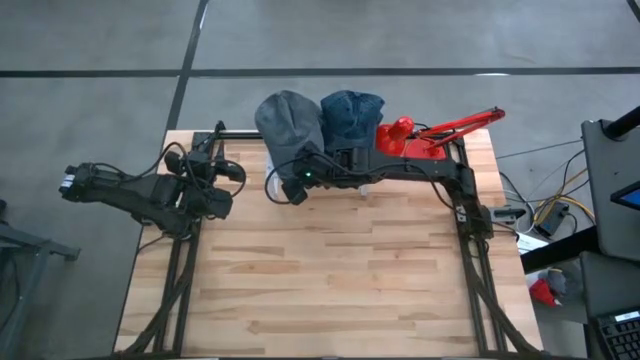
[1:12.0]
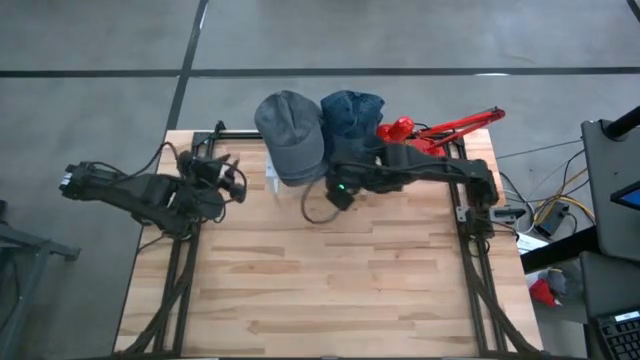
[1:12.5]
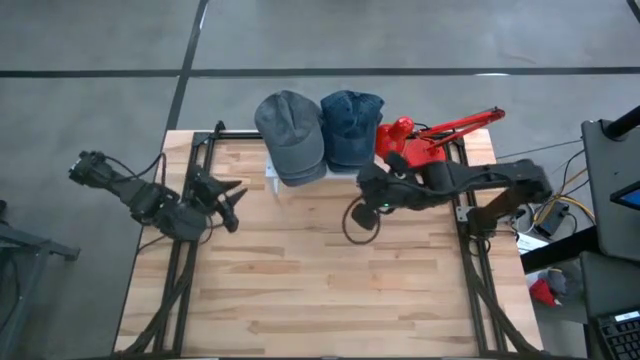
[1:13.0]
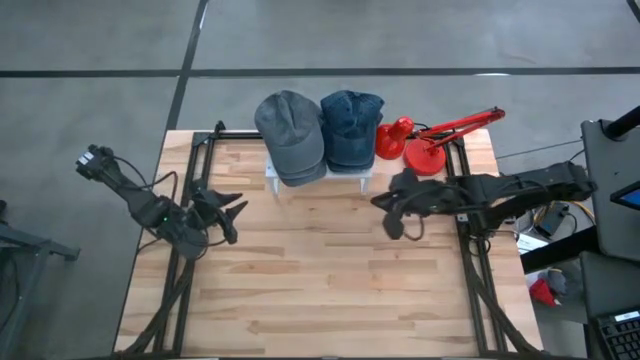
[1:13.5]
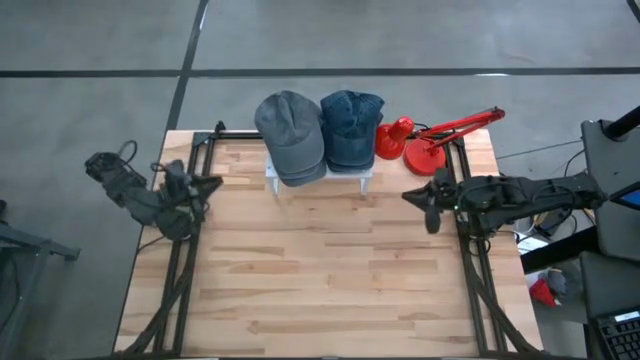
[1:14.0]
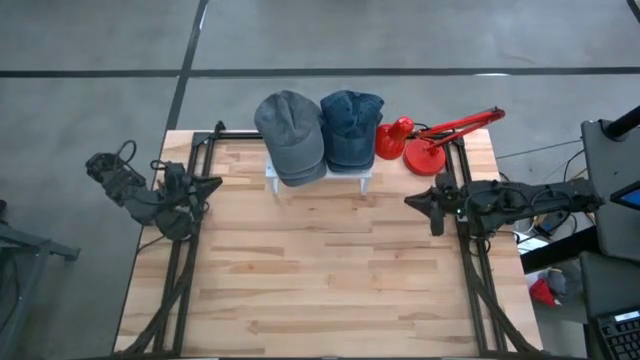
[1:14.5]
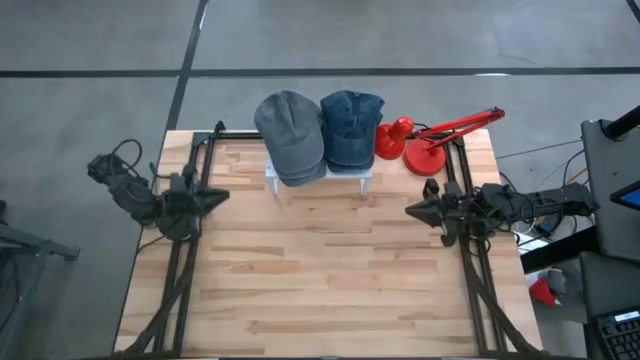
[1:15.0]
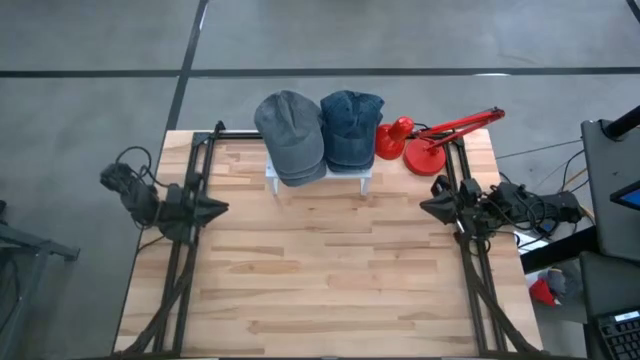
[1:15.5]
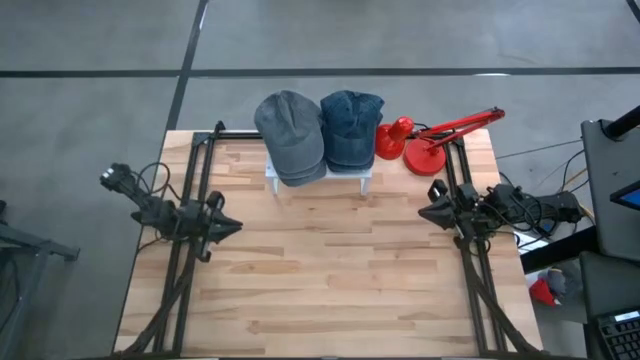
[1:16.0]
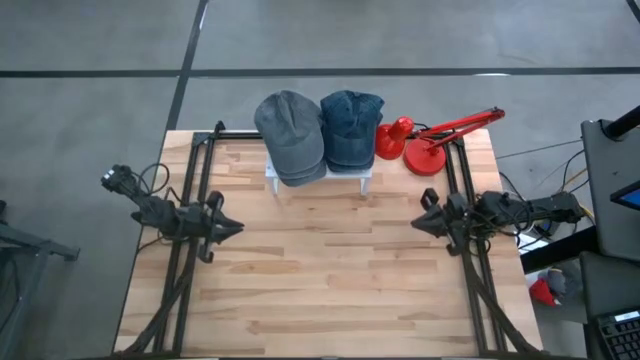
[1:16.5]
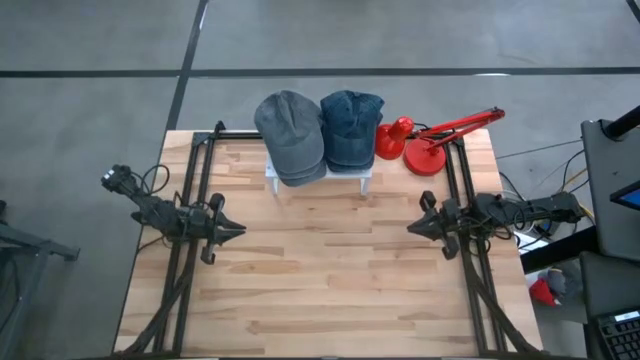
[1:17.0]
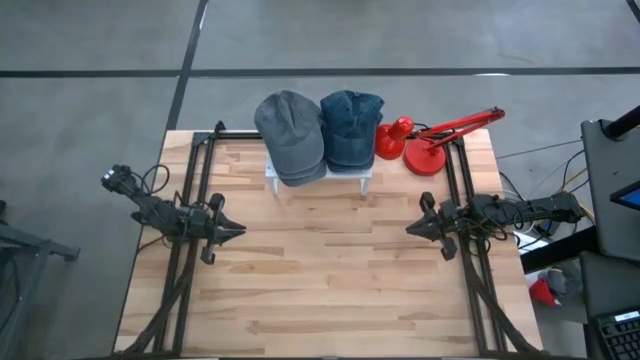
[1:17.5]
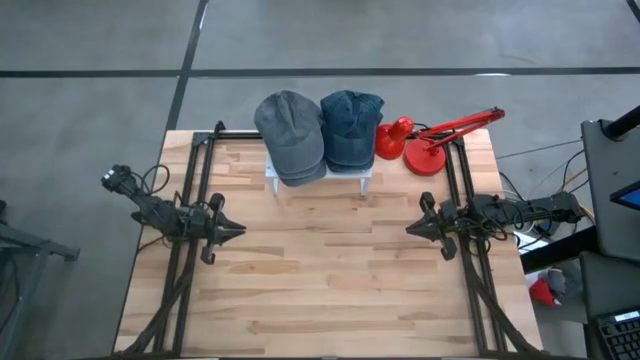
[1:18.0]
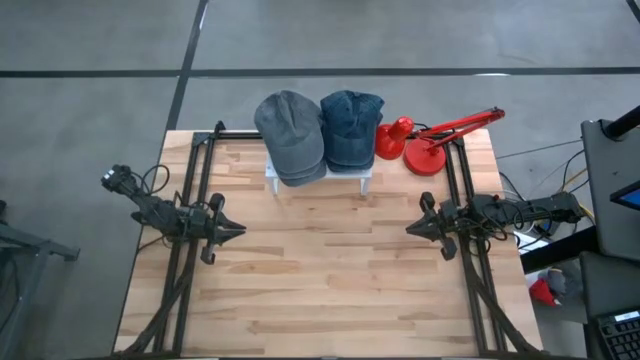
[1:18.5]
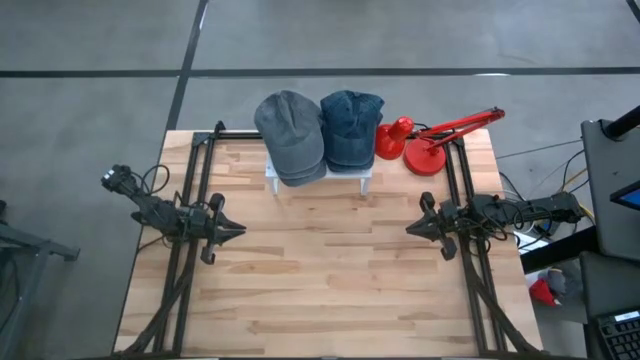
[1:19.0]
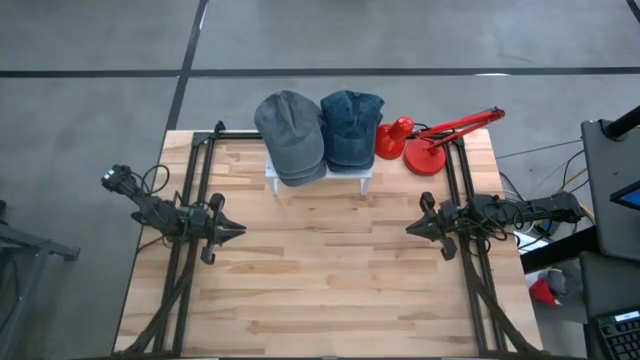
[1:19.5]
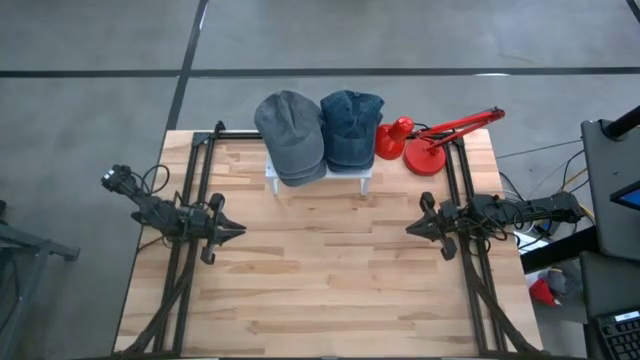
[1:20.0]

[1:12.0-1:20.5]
Task: Pick & Place hat
Return to Home Position

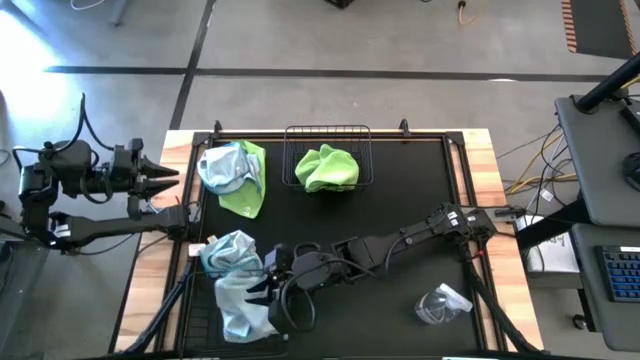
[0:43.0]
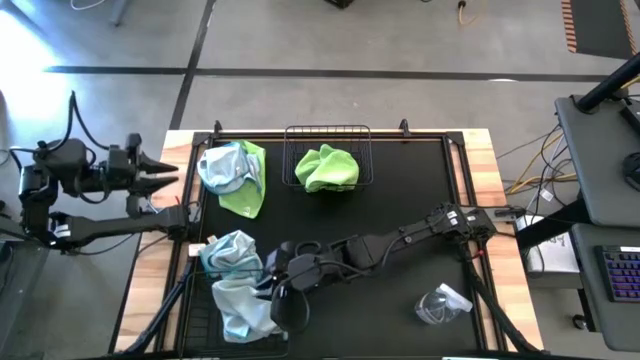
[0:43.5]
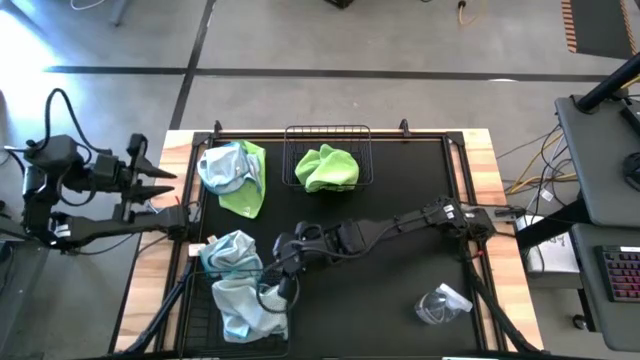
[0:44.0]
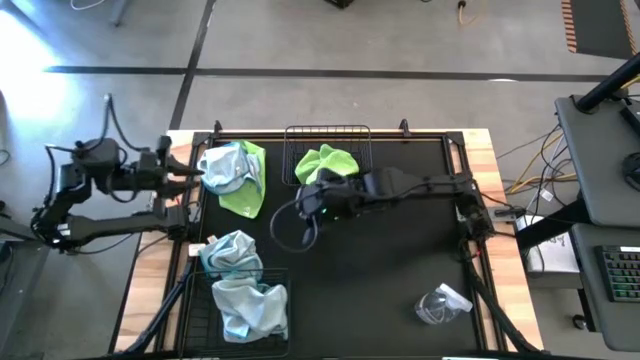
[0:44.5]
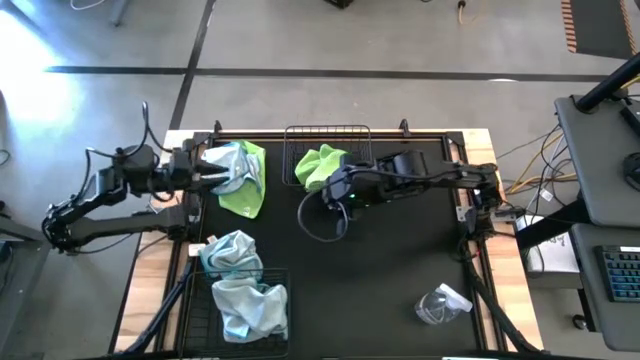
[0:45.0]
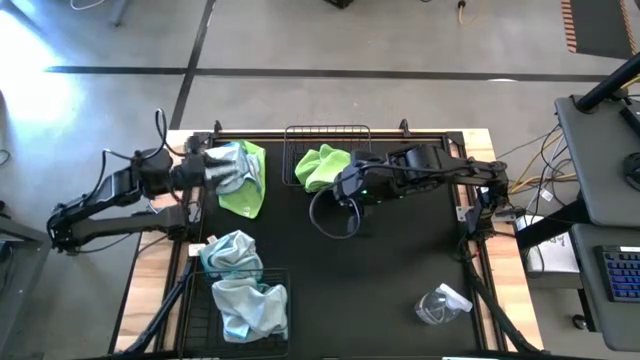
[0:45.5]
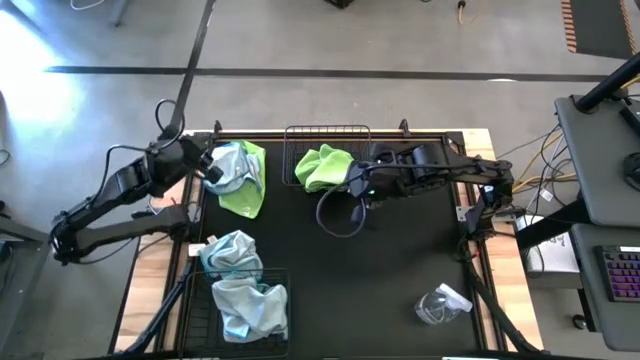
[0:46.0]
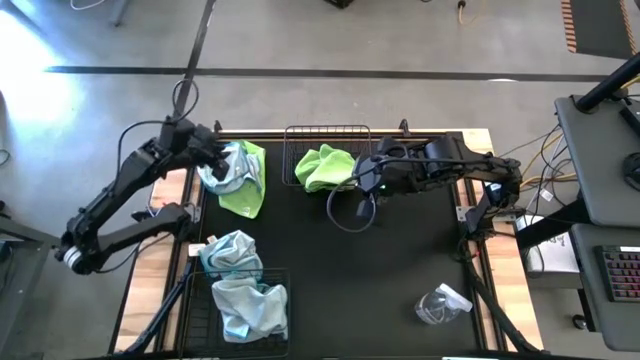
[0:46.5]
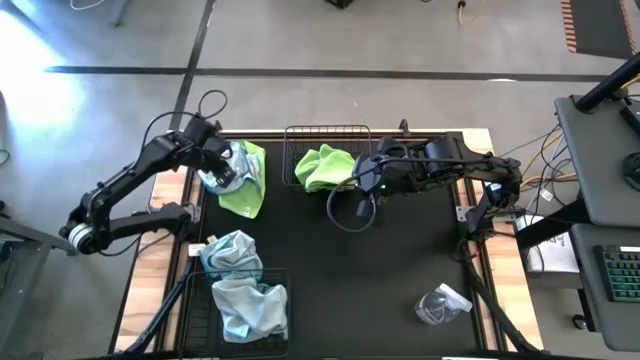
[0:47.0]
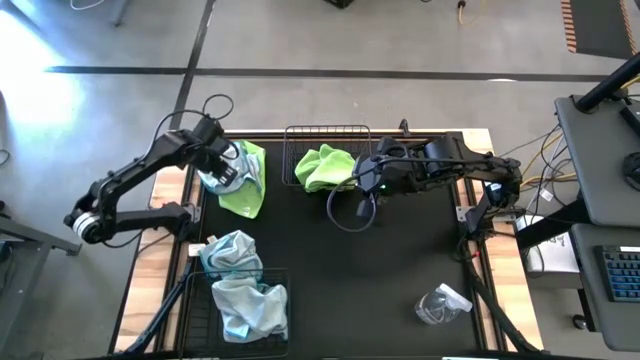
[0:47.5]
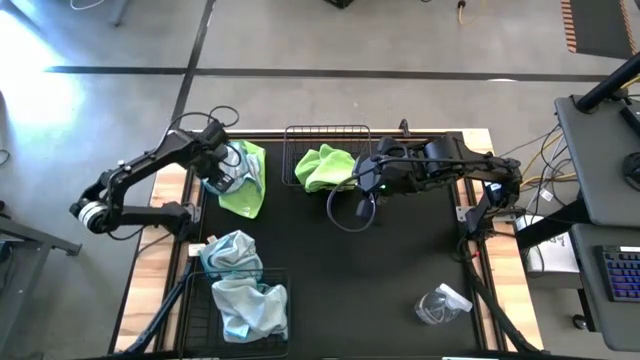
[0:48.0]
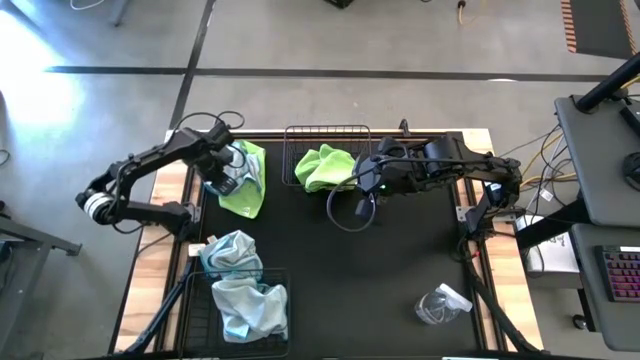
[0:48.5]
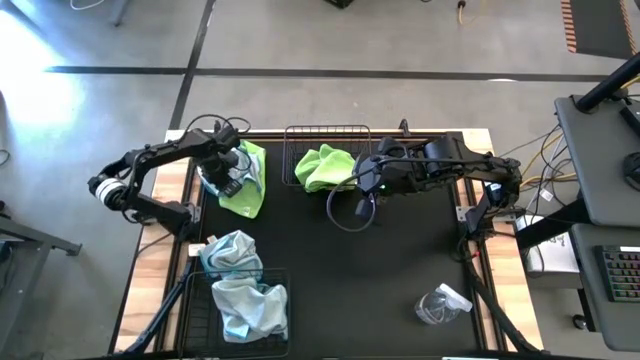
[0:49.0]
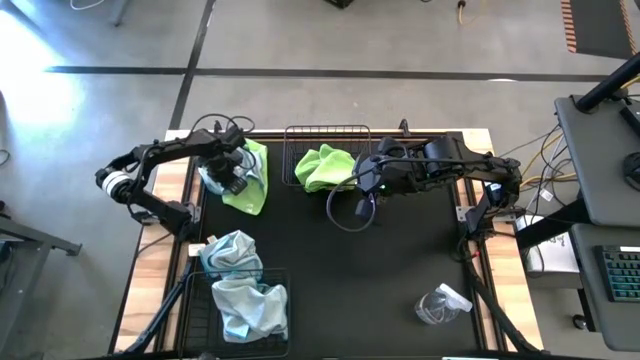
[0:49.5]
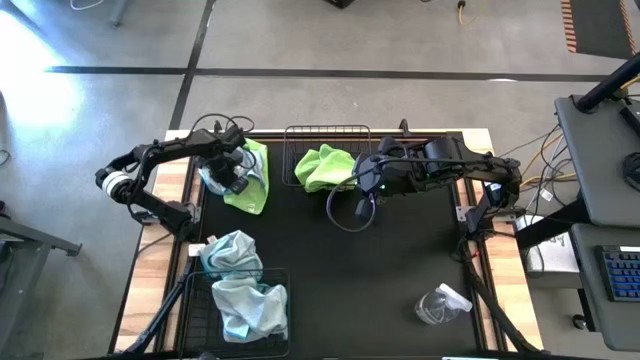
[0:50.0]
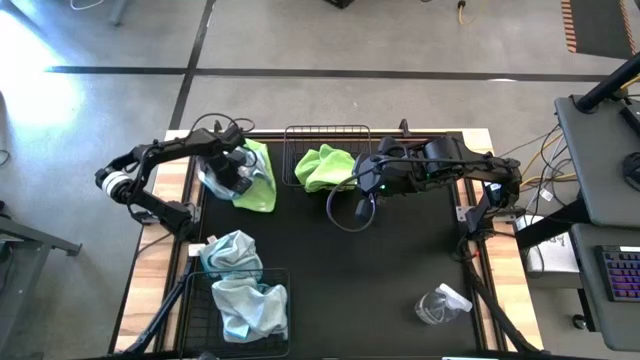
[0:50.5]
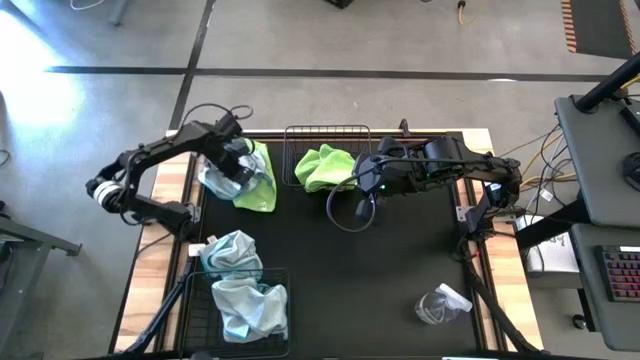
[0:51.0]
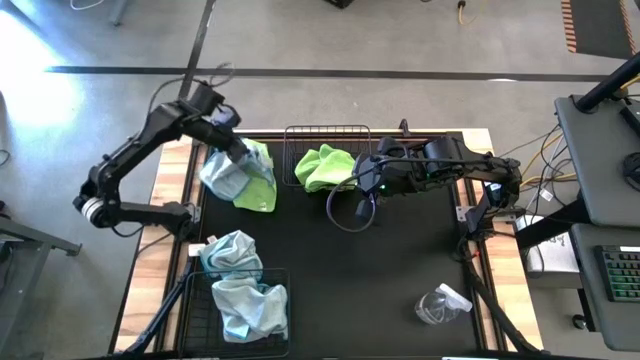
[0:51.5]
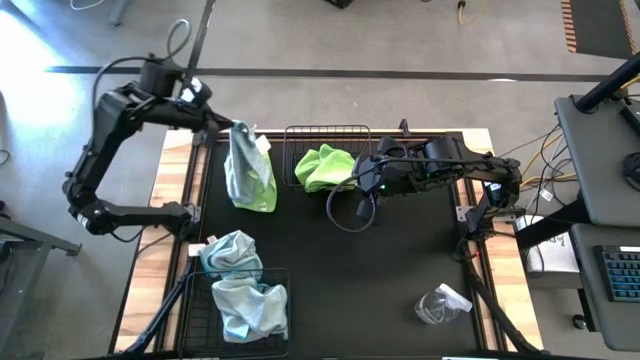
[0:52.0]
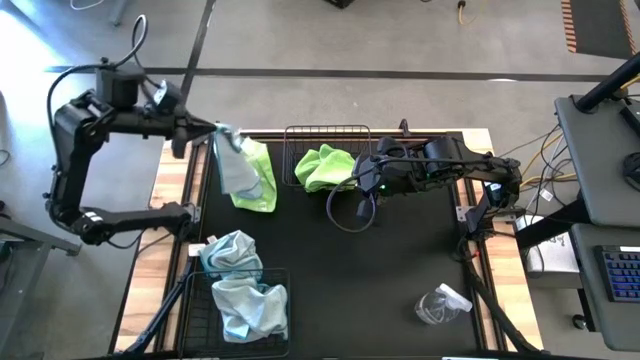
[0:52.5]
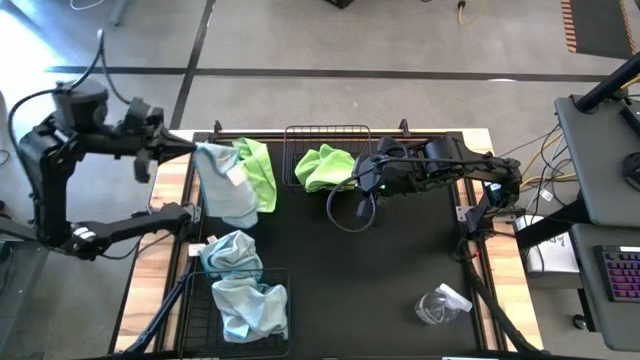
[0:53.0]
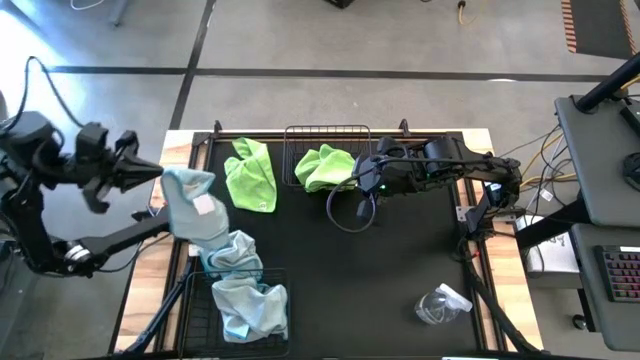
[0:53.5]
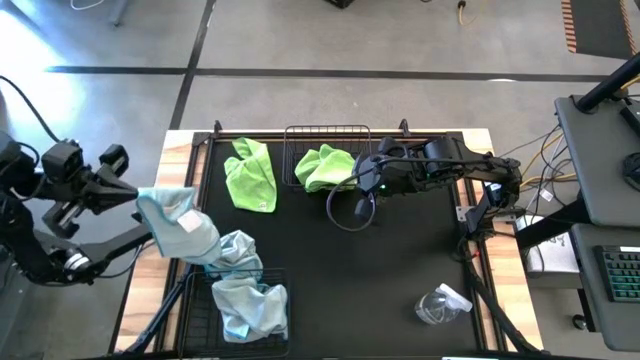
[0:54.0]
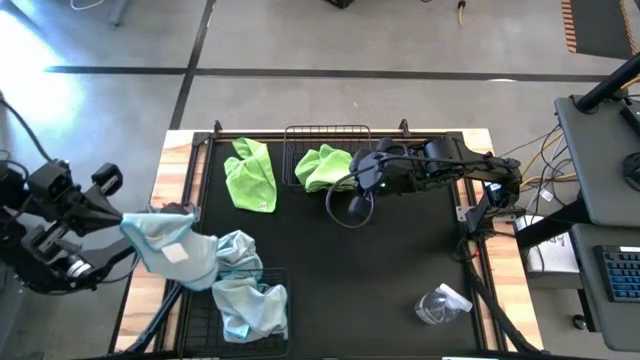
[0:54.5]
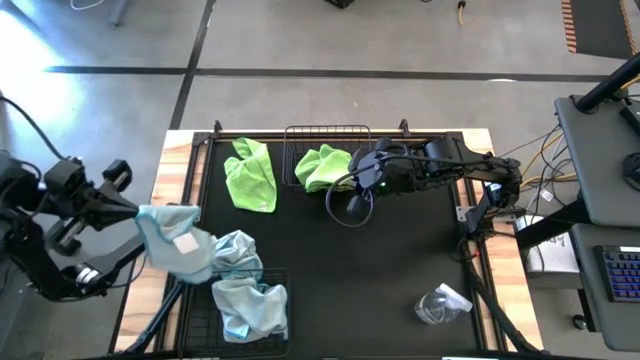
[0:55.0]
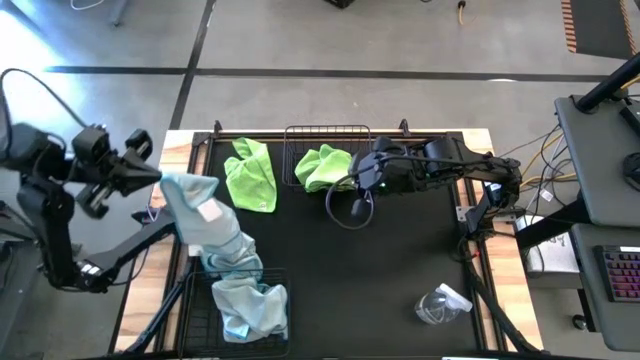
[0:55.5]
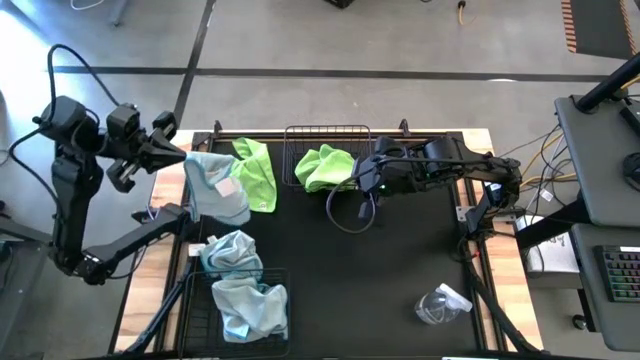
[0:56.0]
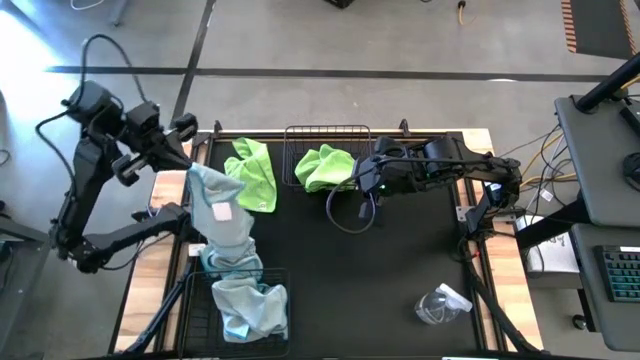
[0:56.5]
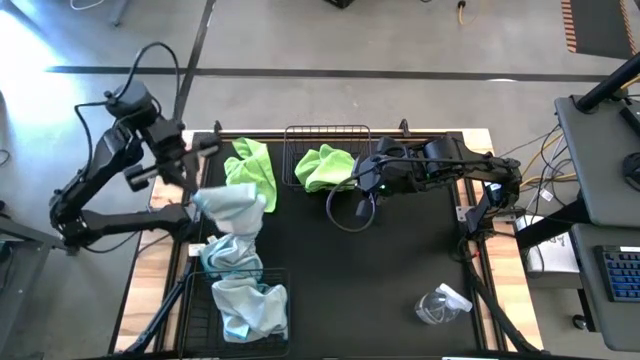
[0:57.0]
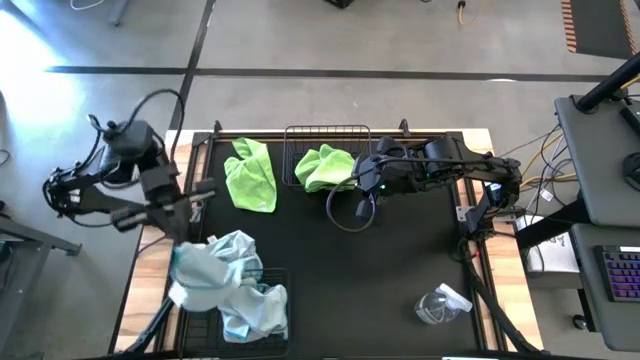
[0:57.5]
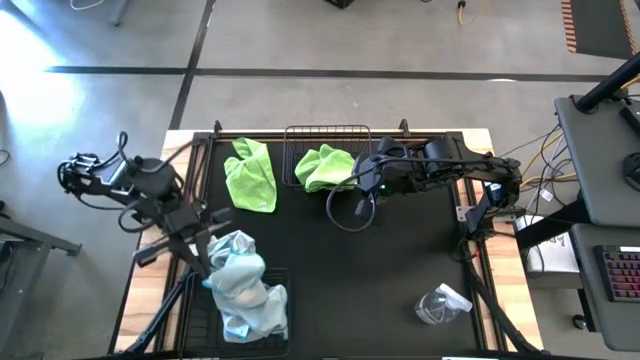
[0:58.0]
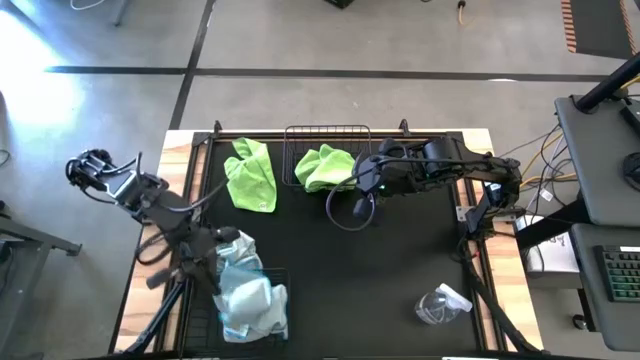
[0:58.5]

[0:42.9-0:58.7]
Task: Sort microfiber towel by color & place in baskets
Put the blue microfiber towel into the bottom black wire basket
